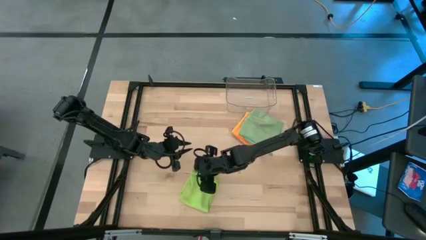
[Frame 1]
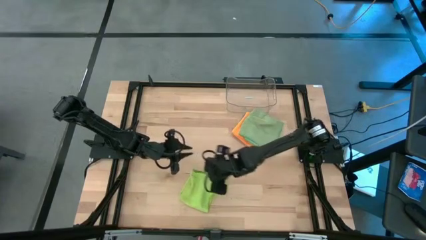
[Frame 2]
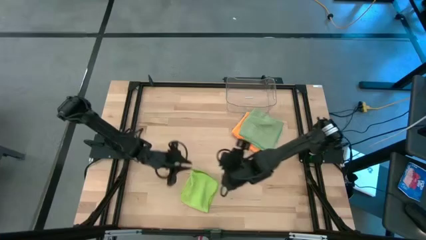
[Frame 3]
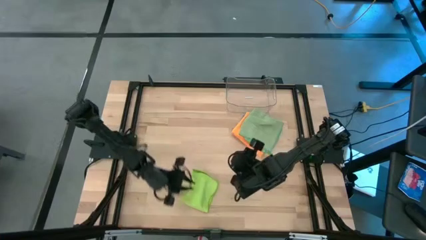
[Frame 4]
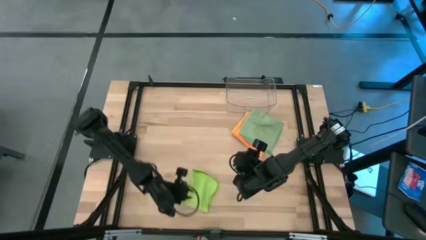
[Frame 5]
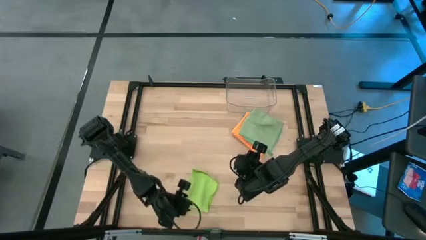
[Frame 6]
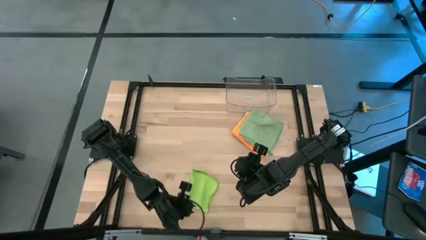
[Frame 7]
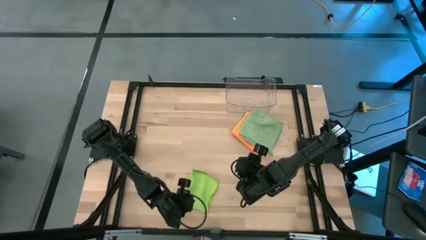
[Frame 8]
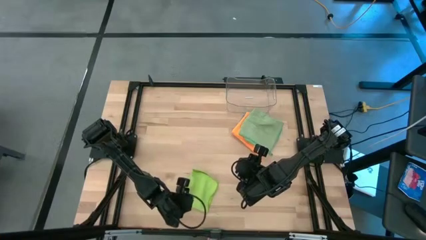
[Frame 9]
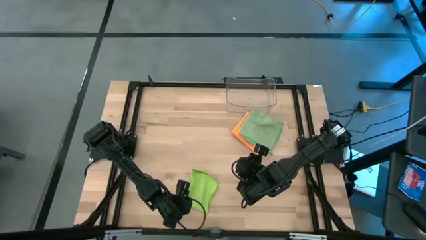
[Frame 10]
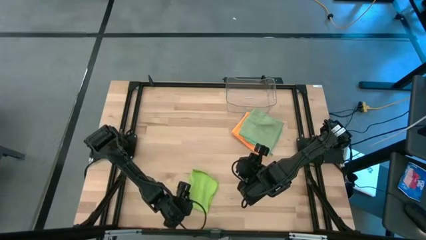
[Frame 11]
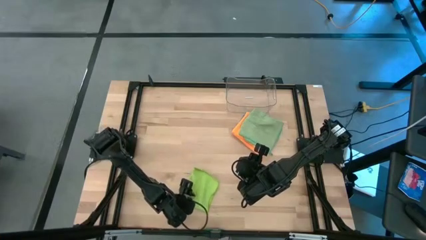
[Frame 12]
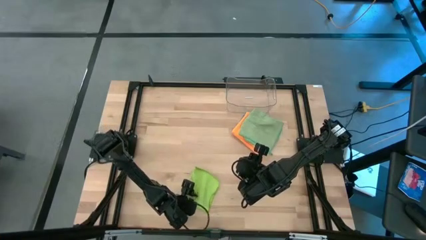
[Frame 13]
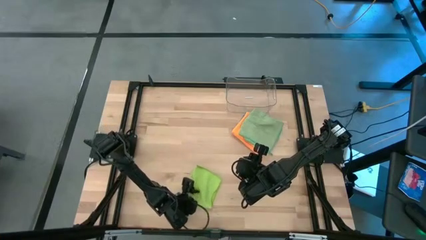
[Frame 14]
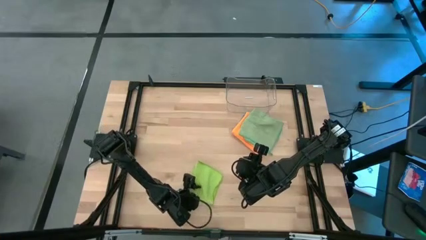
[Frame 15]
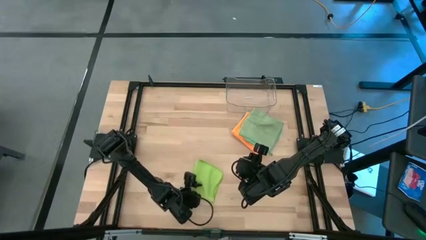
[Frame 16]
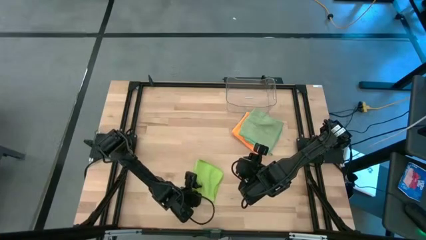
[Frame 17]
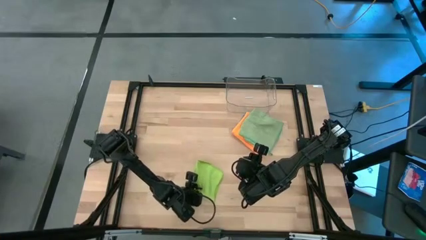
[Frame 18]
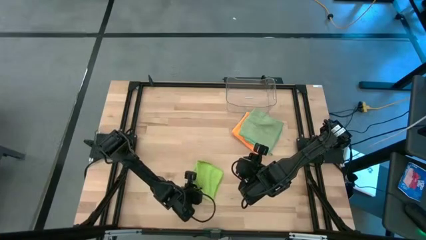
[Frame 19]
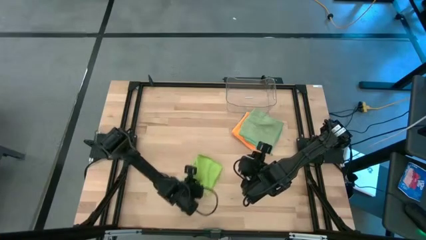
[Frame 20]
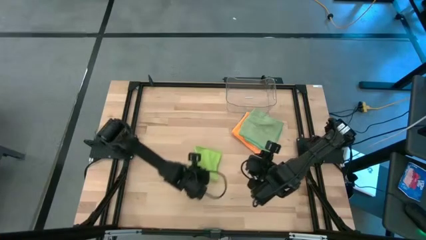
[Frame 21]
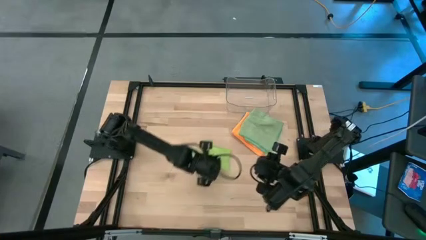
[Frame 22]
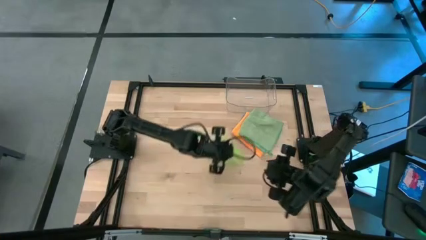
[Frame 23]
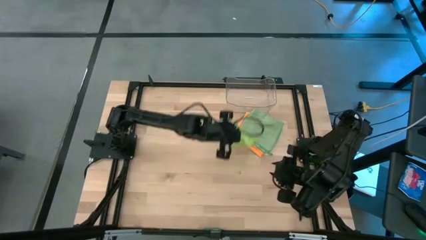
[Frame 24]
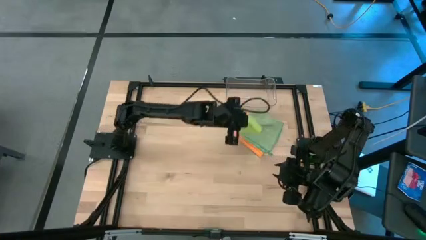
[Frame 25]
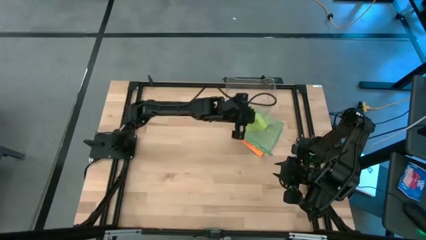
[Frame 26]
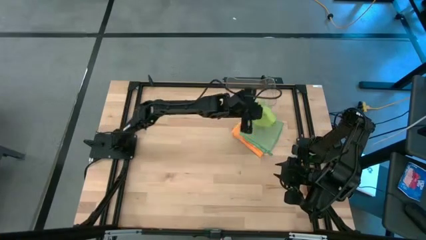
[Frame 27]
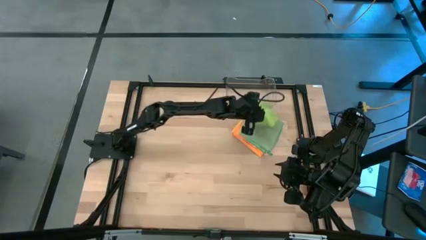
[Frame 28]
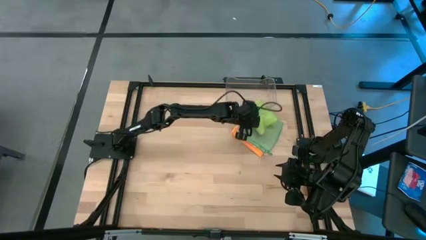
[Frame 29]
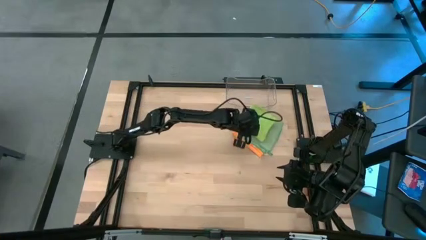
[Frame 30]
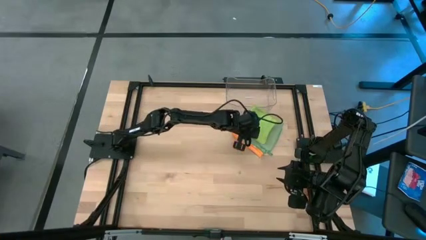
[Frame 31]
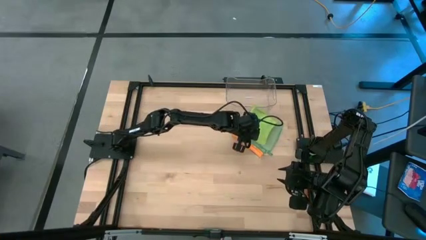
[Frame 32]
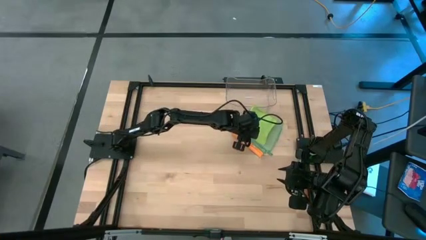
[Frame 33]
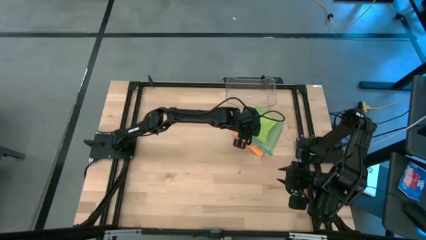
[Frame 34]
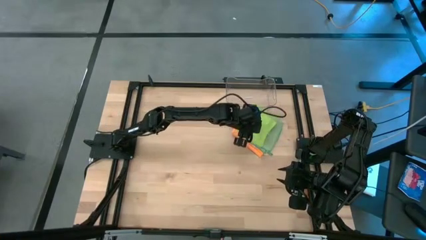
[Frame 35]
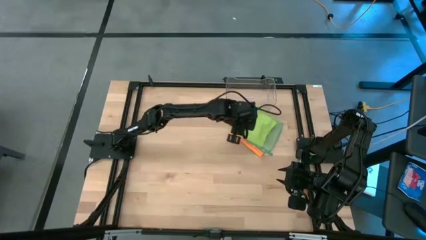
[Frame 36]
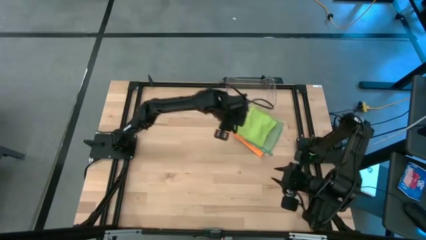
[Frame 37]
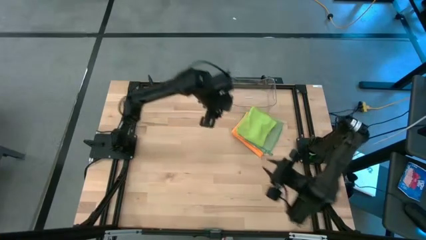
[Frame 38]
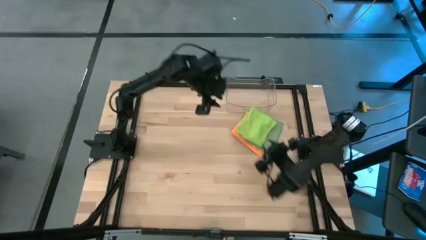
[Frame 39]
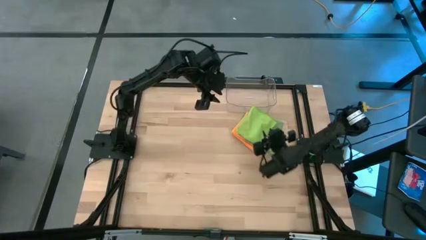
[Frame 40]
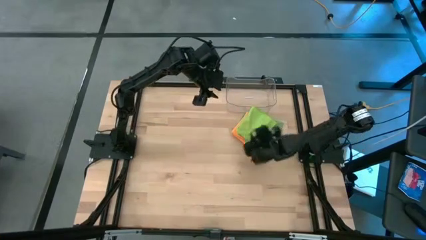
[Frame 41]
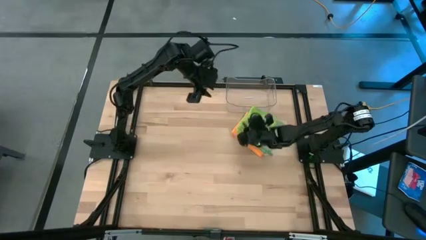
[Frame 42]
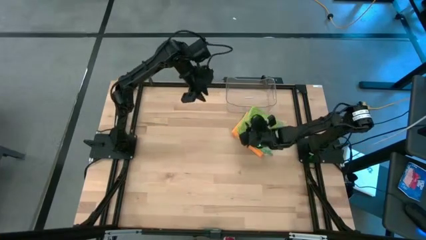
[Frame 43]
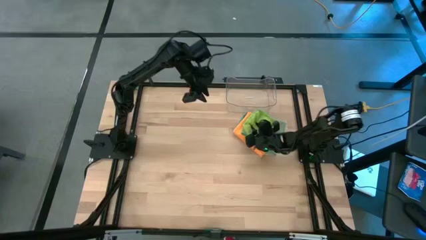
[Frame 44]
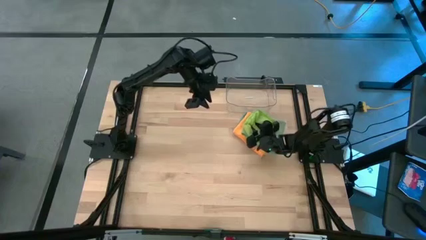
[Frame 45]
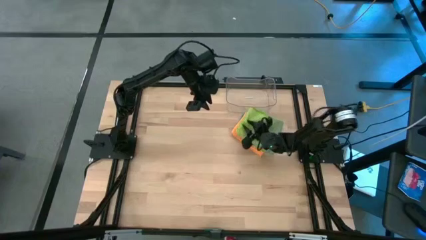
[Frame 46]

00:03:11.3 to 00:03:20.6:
Task: Fold microfiber towels
Stack the light green microfiber cloth on top of the green microfiber cloth

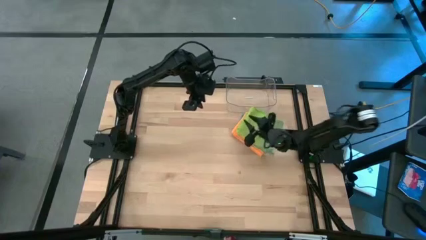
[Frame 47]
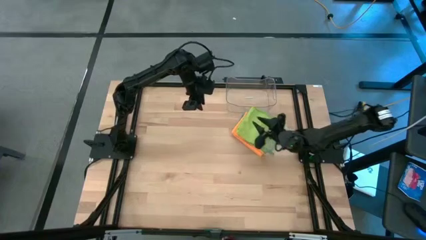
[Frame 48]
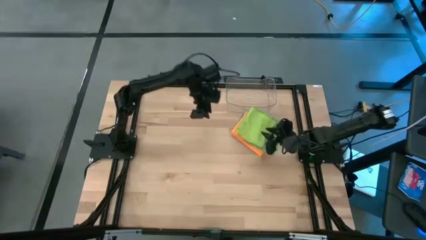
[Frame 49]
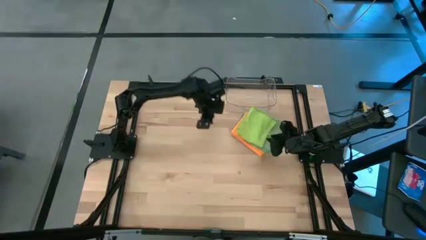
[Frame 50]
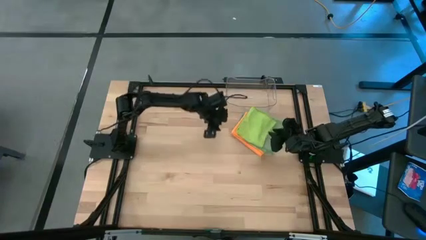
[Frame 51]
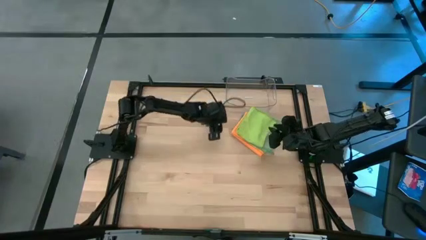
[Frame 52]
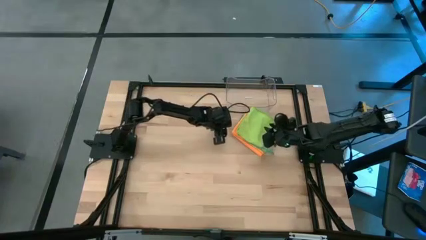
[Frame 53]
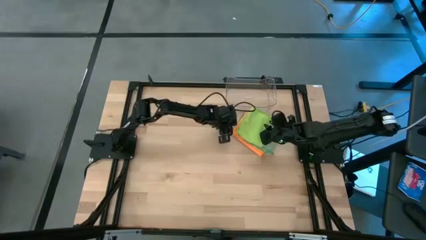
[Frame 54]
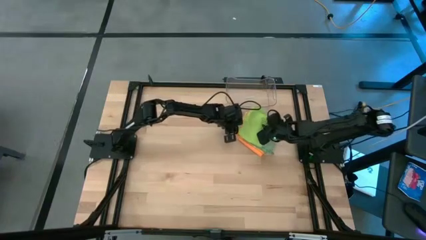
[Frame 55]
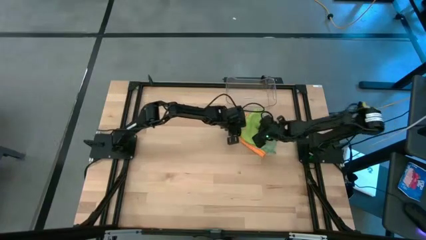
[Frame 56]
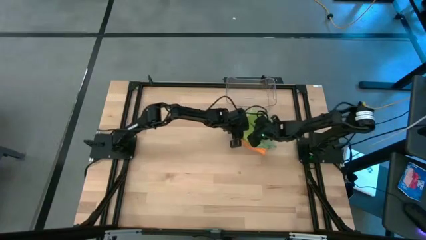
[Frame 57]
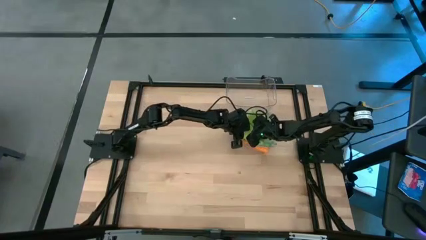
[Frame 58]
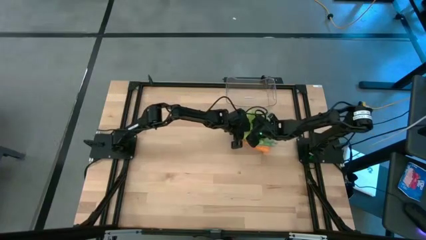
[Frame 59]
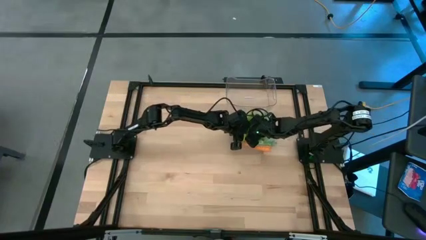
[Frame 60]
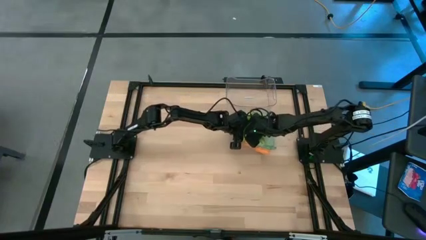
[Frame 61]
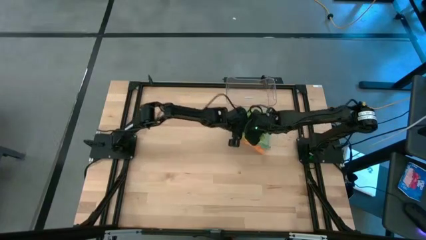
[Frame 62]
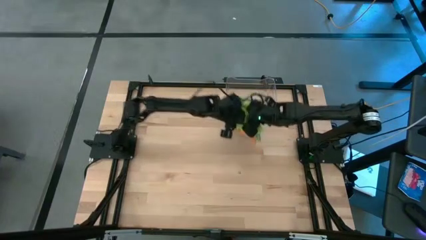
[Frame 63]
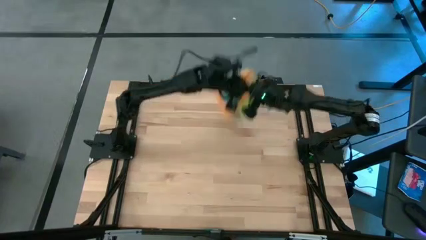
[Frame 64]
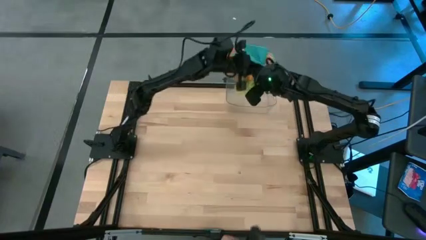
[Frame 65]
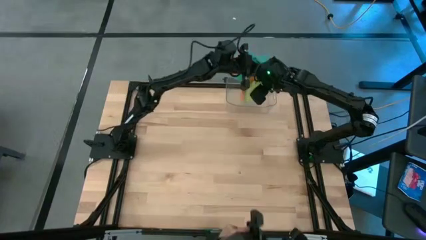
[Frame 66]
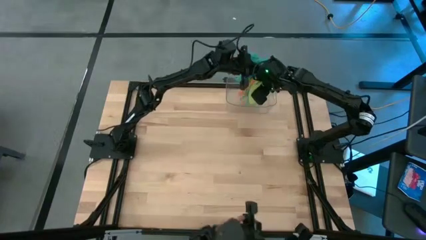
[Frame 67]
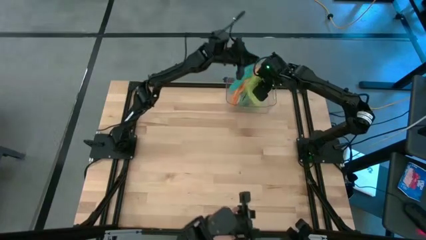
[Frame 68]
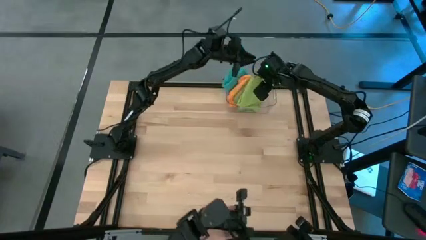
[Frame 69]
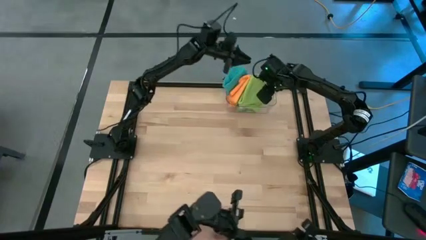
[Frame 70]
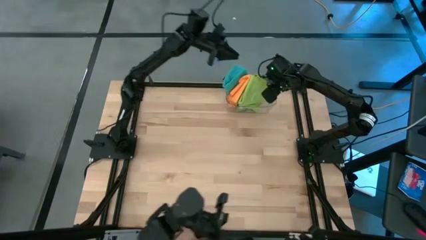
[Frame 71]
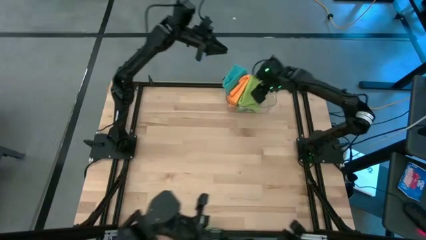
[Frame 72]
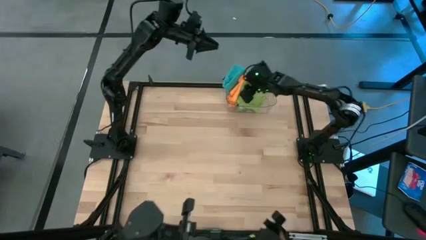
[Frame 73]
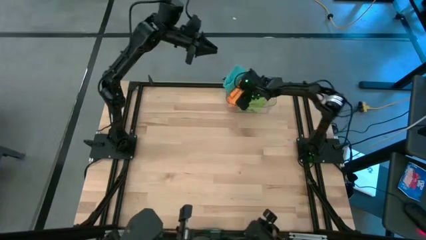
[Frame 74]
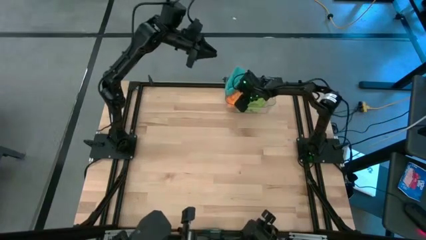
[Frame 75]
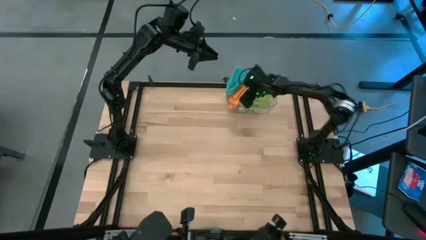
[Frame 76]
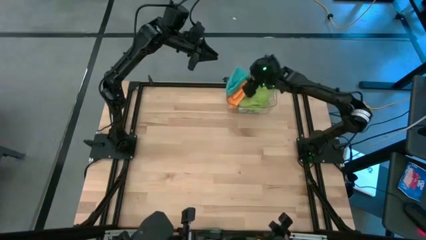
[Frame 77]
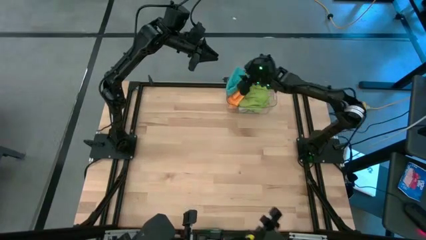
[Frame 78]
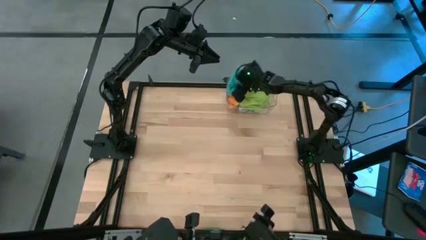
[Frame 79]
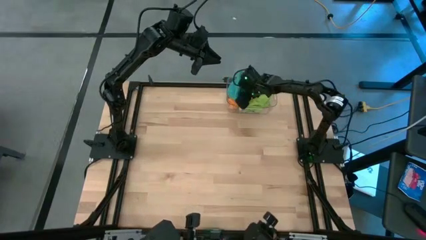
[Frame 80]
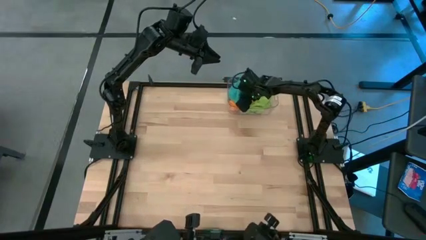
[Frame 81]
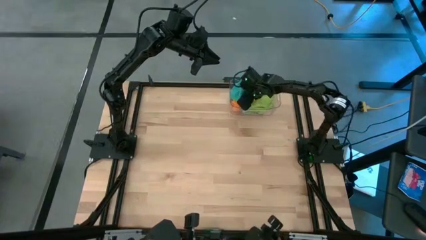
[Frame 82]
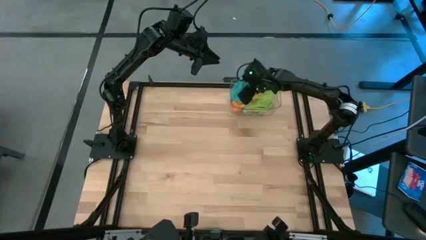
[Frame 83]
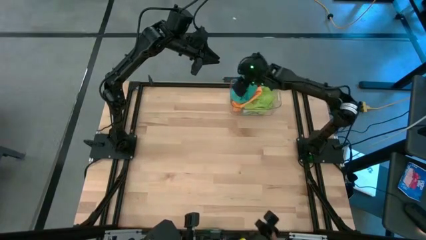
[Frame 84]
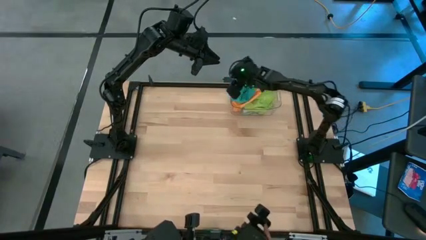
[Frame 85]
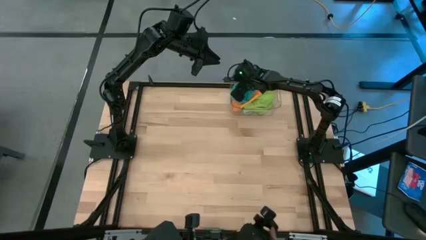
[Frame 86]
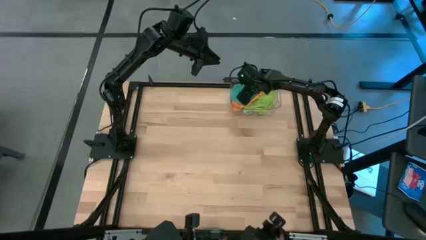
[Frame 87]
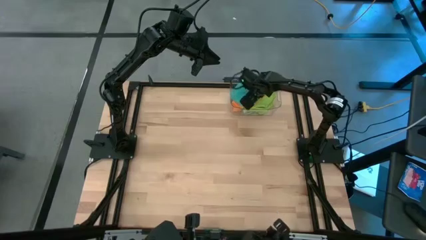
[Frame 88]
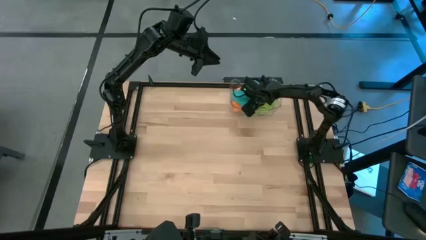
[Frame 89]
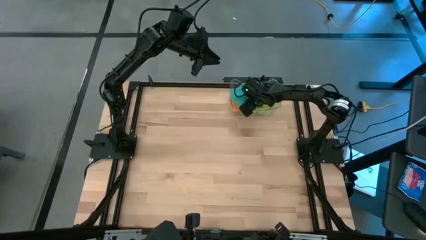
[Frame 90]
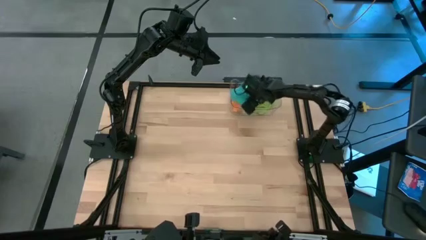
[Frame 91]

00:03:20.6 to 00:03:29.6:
Put the folded microfiber cloths into the transparent bin
